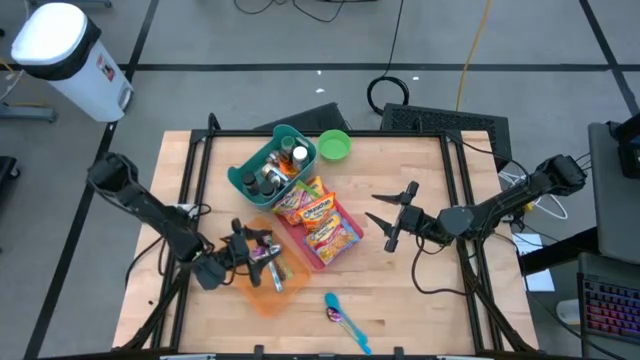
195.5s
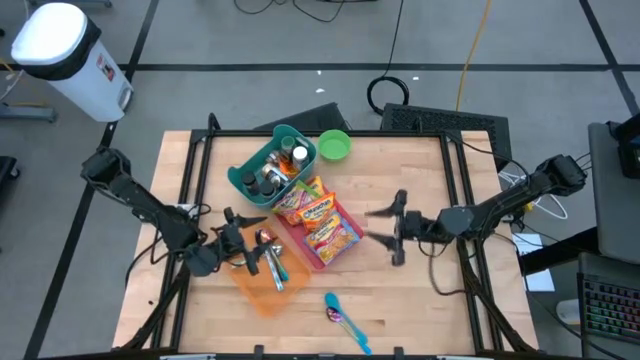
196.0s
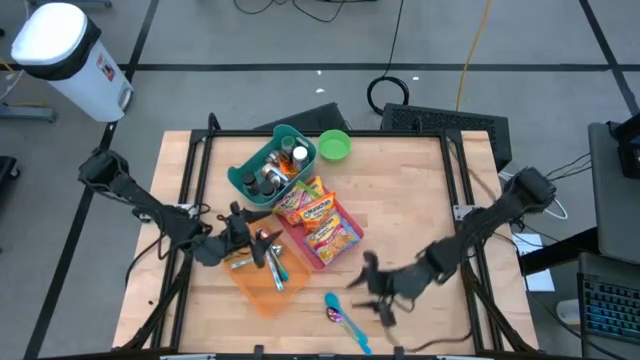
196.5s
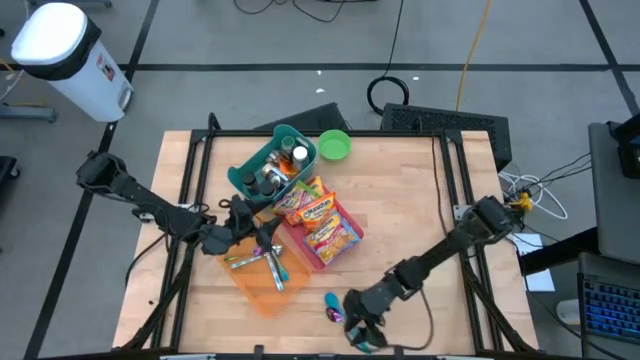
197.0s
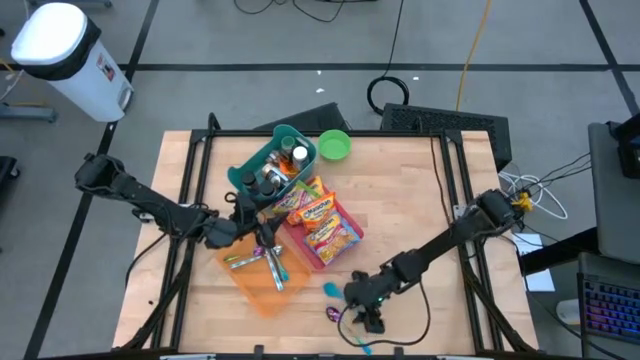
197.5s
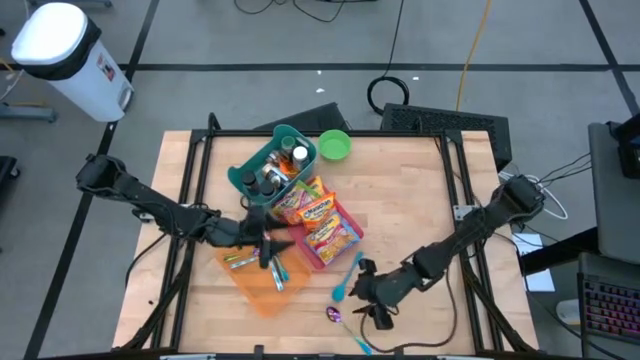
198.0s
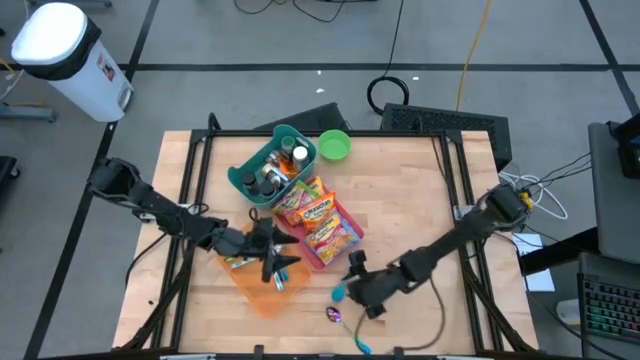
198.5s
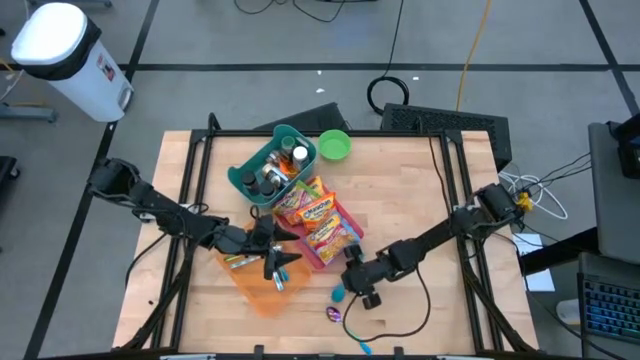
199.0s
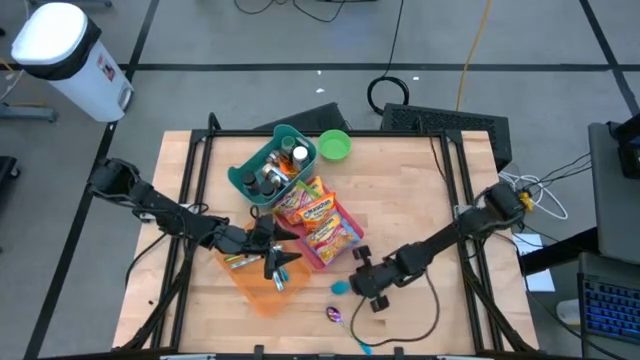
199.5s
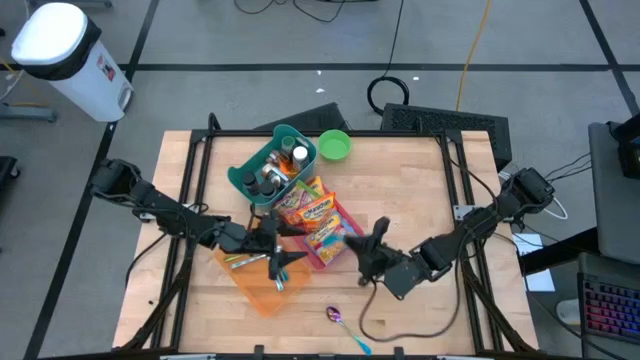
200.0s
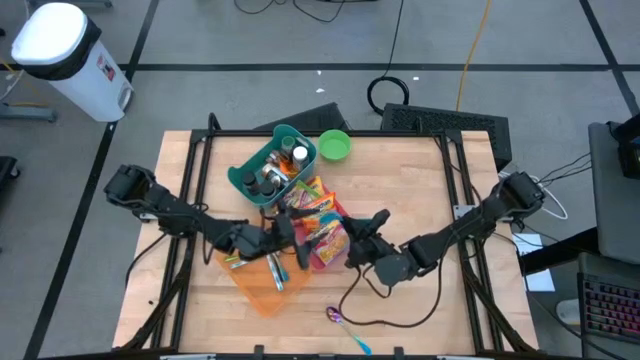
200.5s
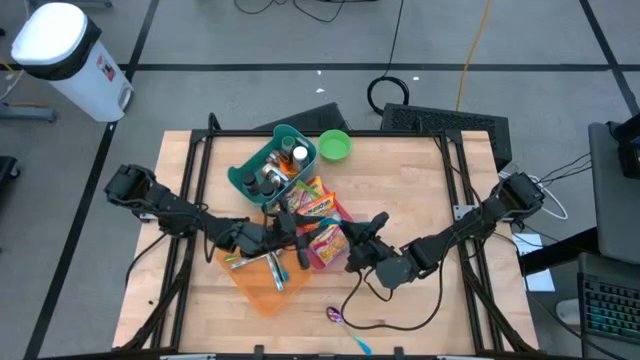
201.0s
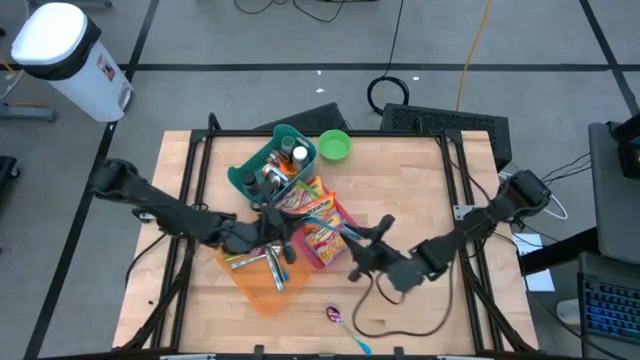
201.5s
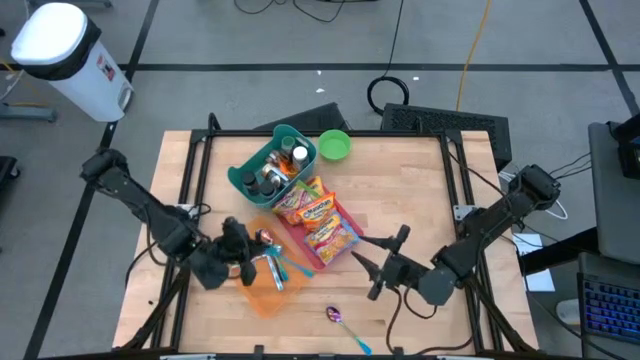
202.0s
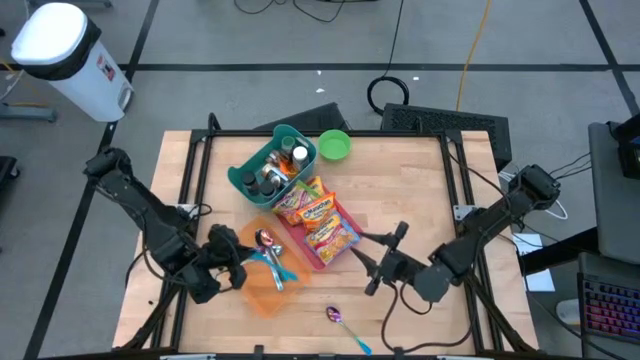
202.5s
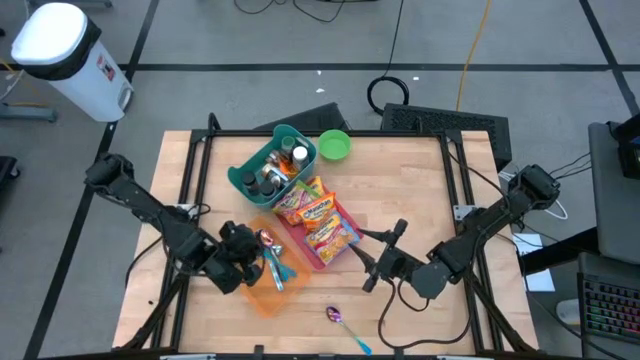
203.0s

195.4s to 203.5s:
Task: Pick & Place Food Item
Put the blue spoon into the orange bin

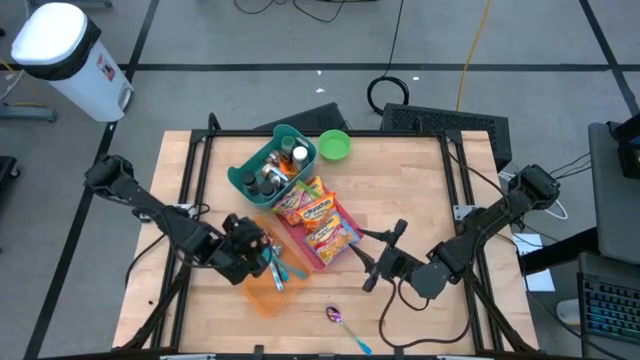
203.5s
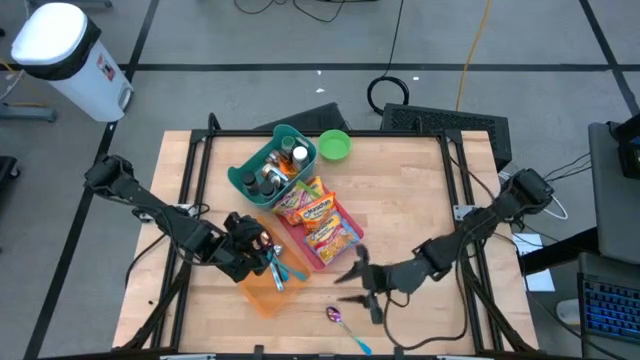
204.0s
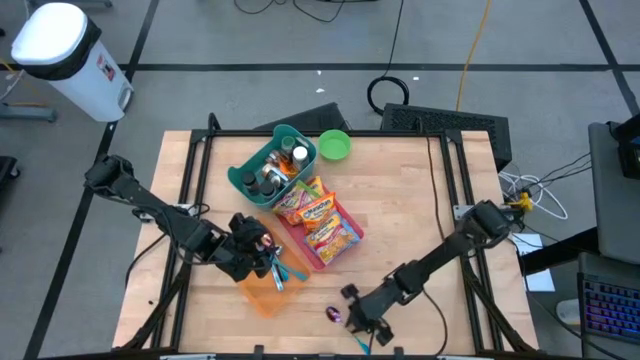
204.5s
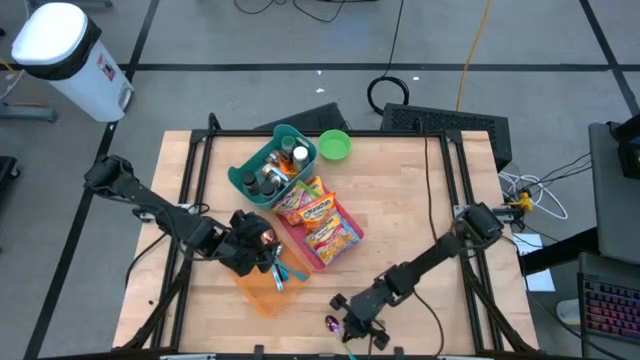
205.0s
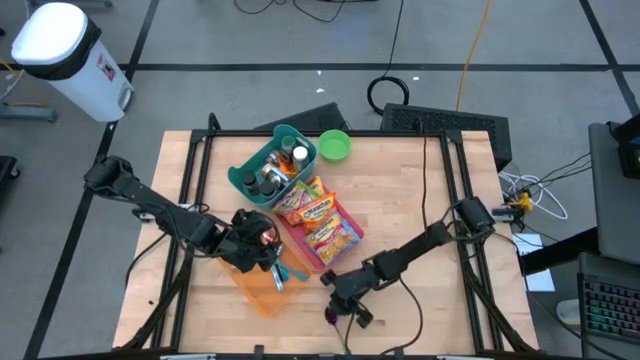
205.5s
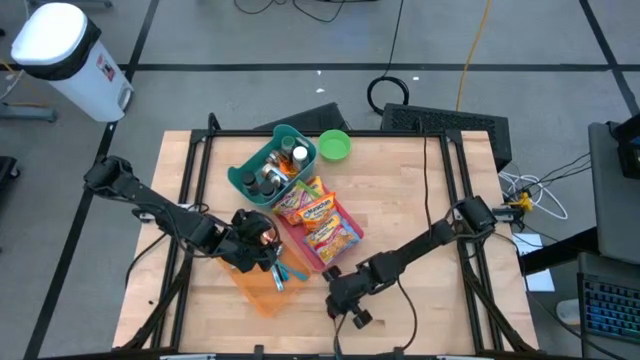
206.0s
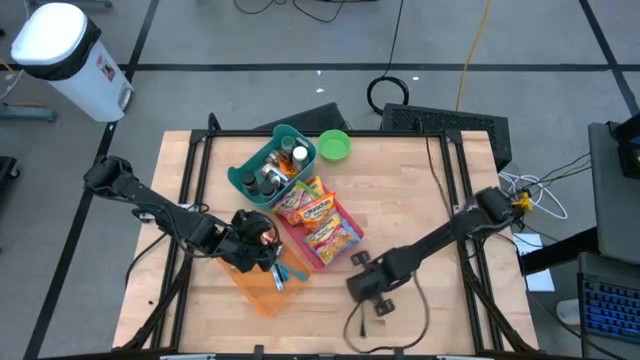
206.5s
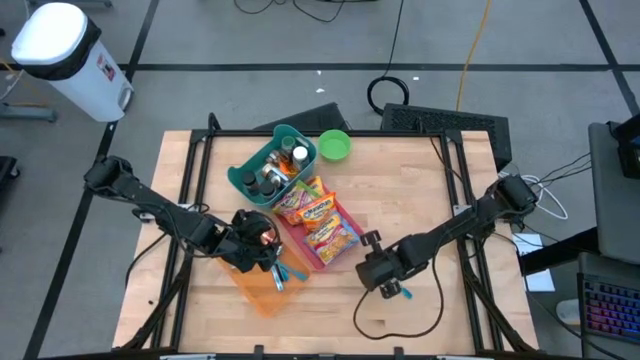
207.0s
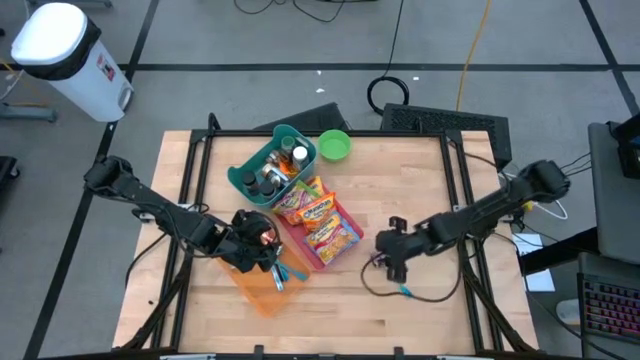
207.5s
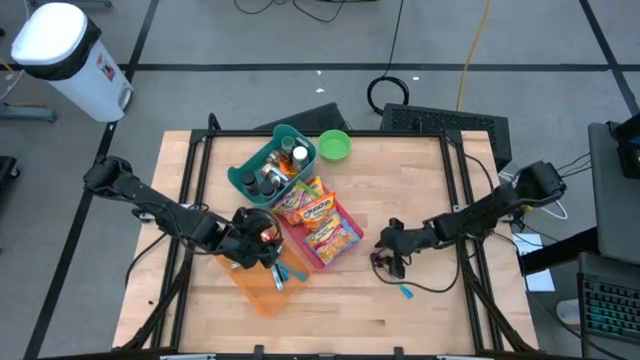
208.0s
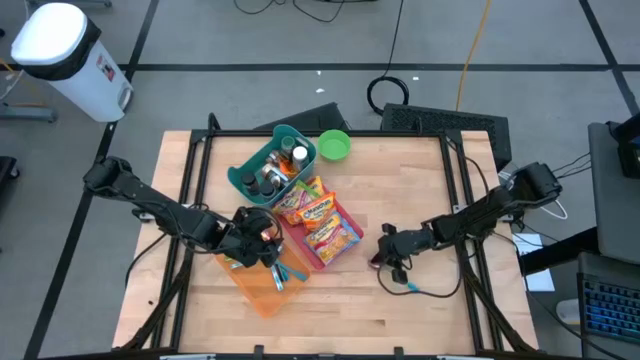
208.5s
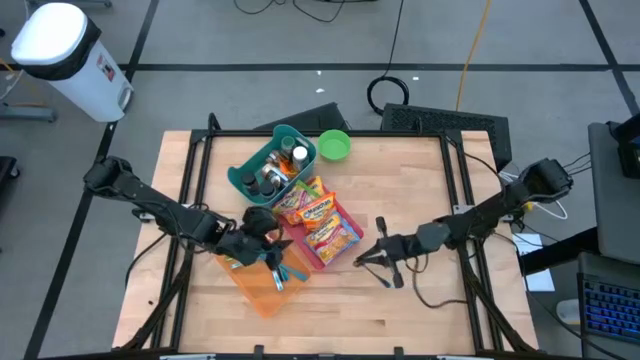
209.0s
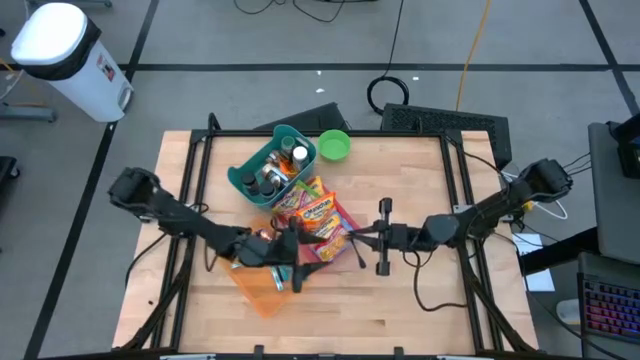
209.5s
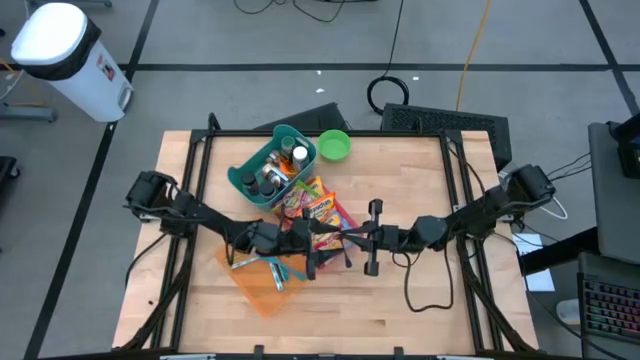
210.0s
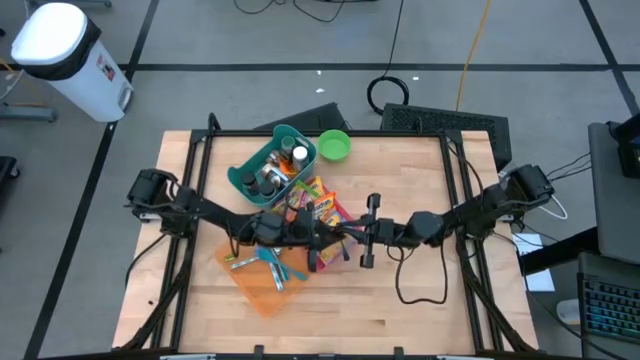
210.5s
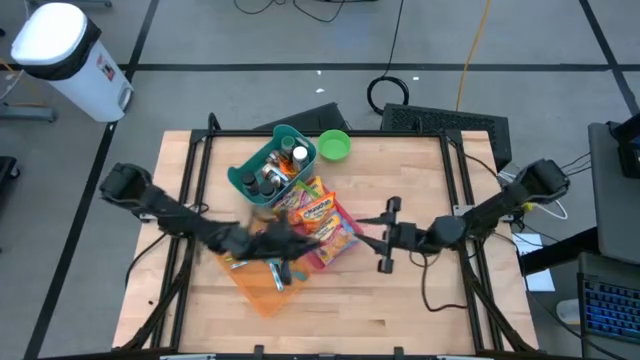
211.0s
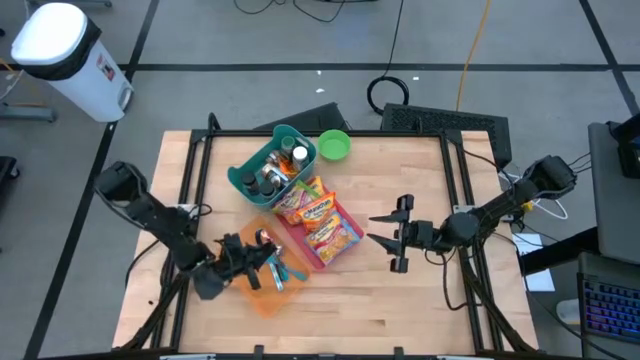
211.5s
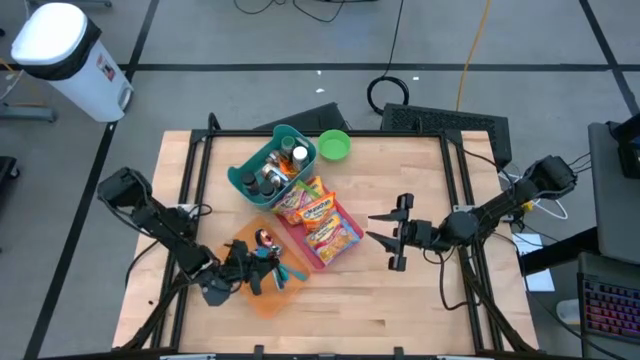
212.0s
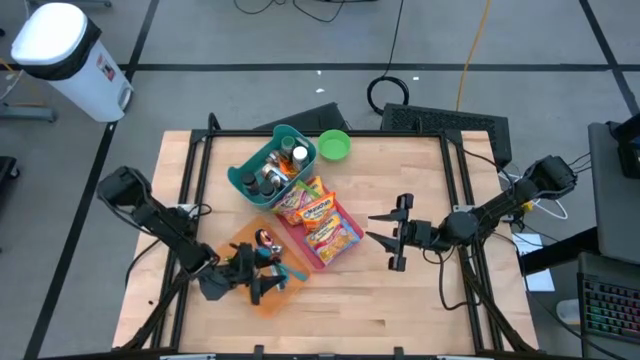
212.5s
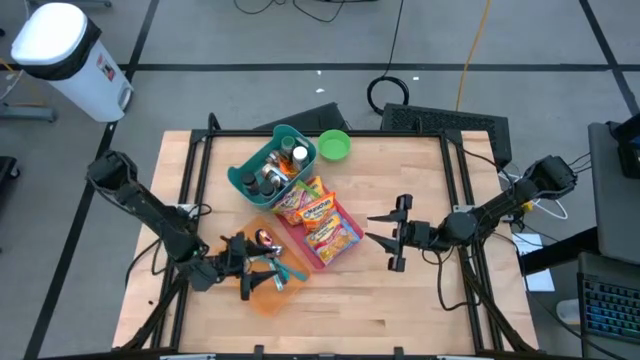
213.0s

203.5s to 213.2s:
Put the blue green spoon into the orange bin
